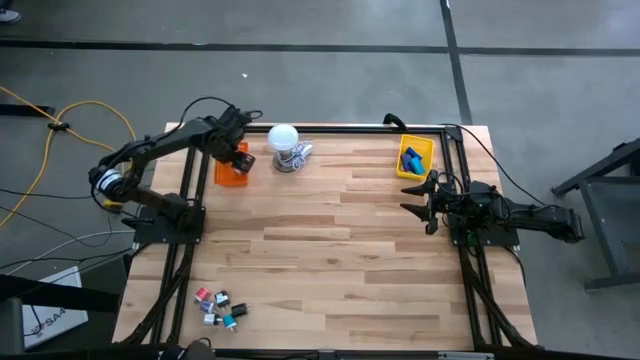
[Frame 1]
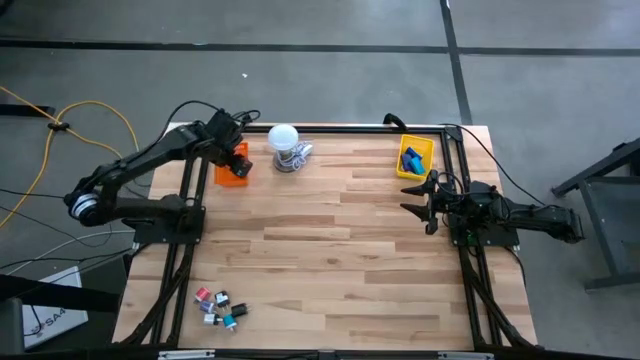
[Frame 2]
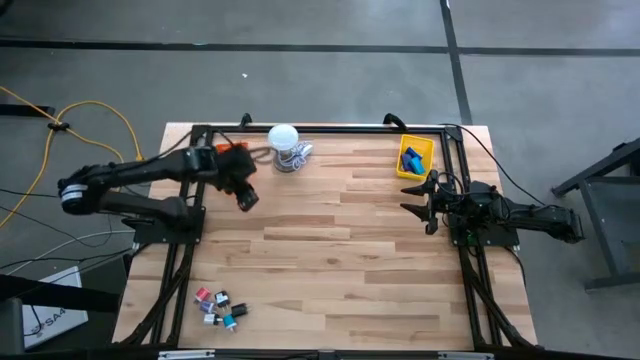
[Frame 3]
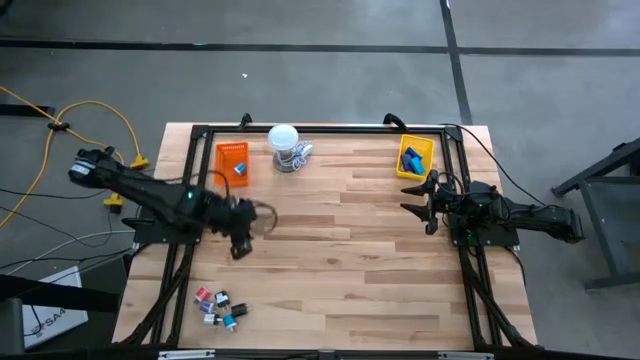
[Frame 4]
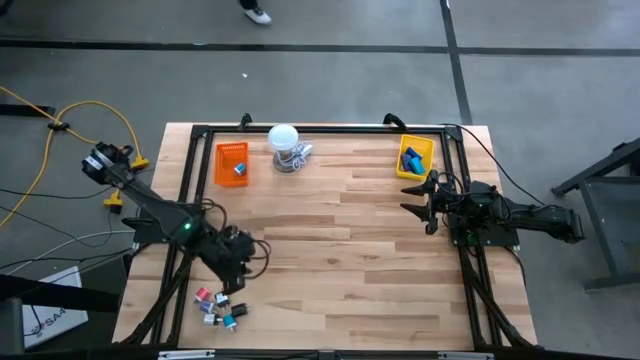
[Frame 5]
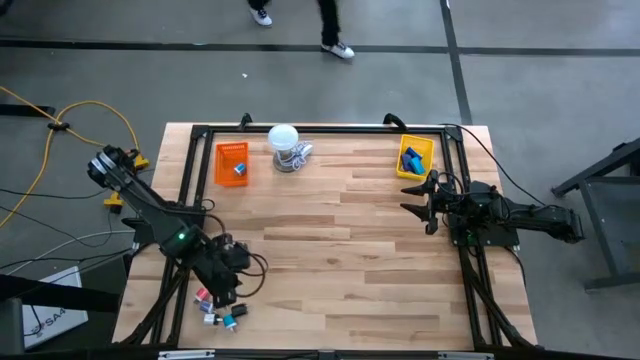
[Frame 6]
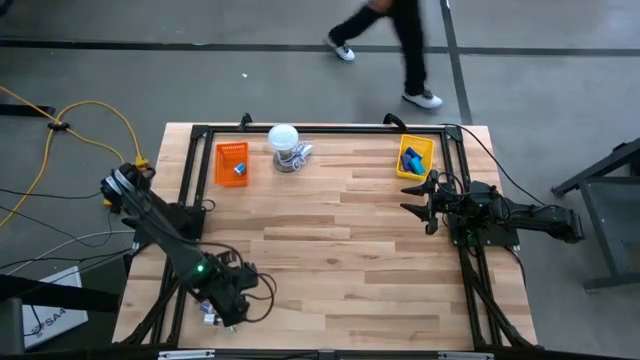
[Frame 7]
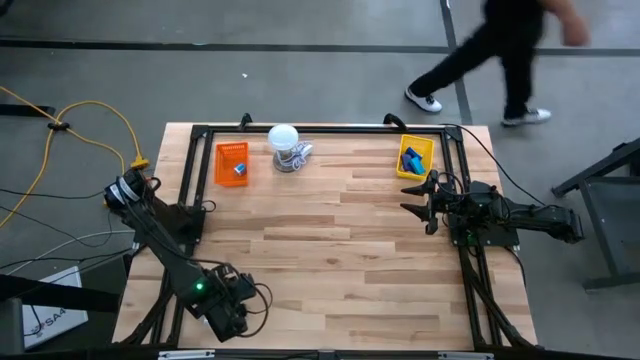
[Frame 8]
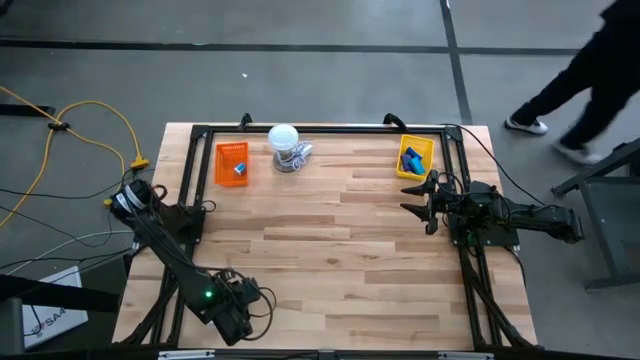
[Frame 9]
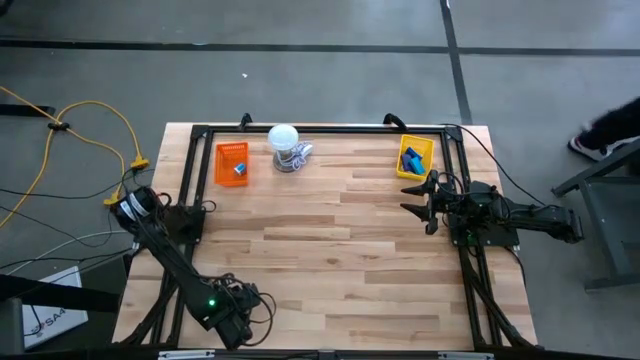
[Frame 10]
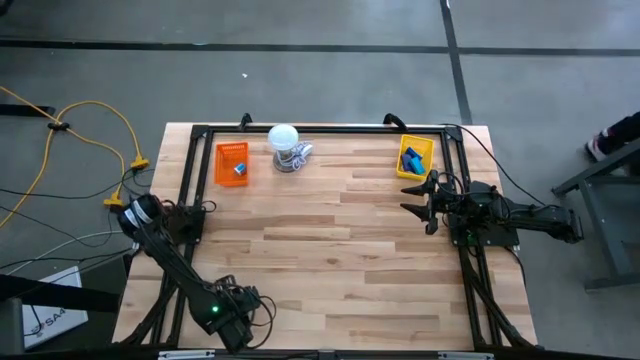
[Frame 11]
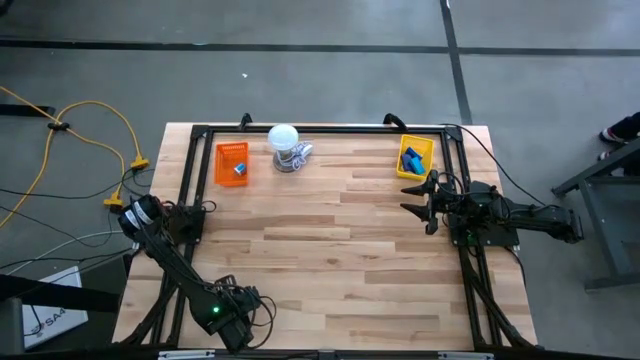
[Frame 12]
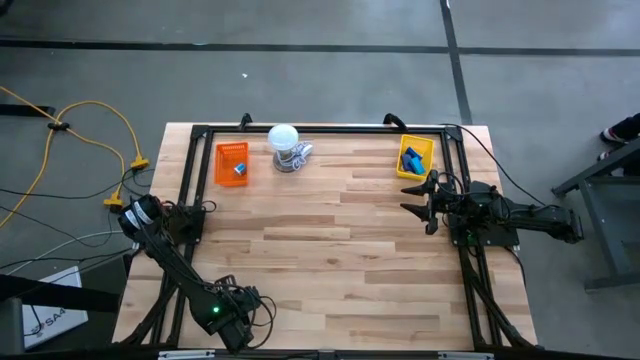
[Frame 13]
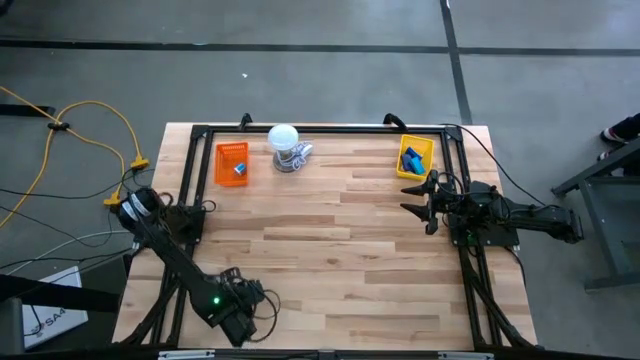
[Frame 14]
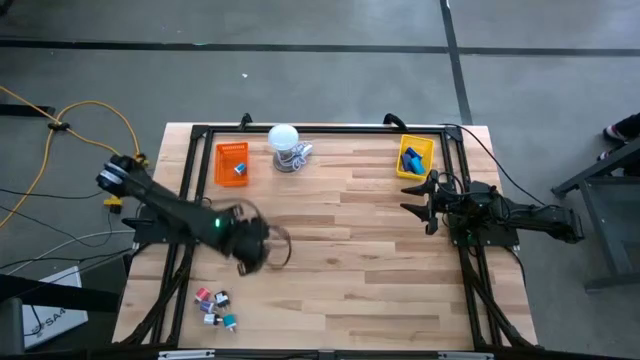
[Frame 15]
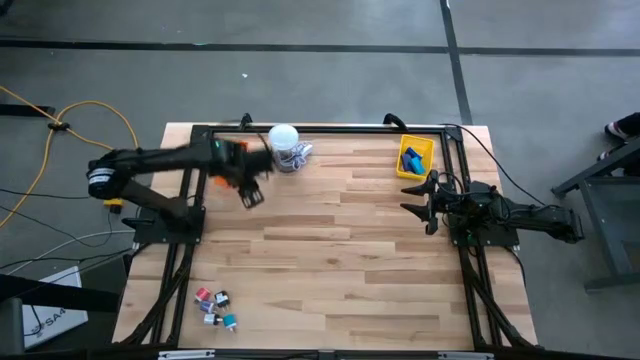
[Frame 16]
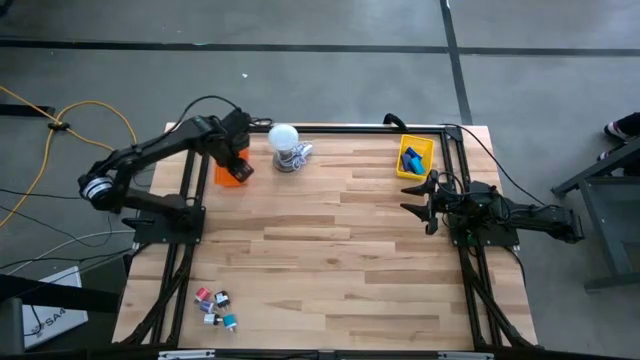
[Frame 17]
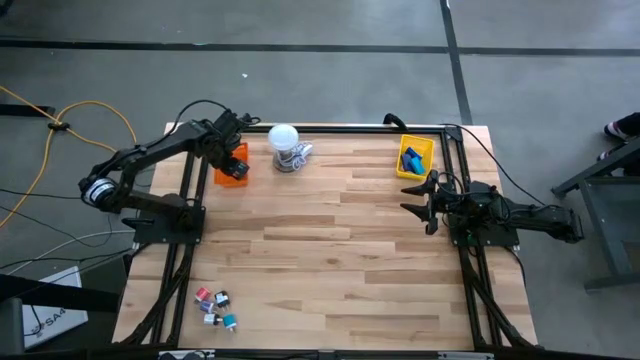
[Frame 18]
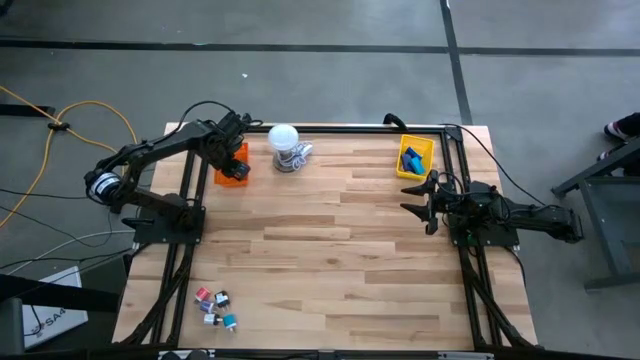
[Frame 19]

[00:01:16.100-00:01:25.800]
Task: Pick & Place Office items
Put the black charger adapter into the orange basket

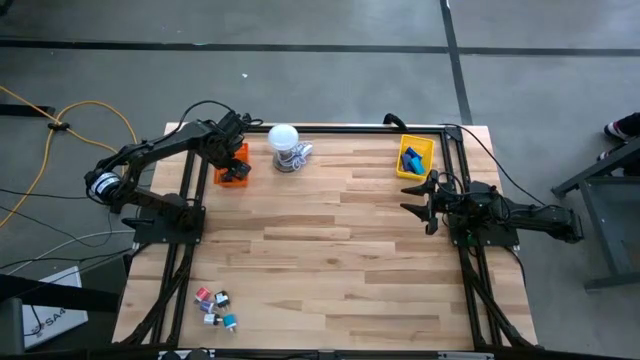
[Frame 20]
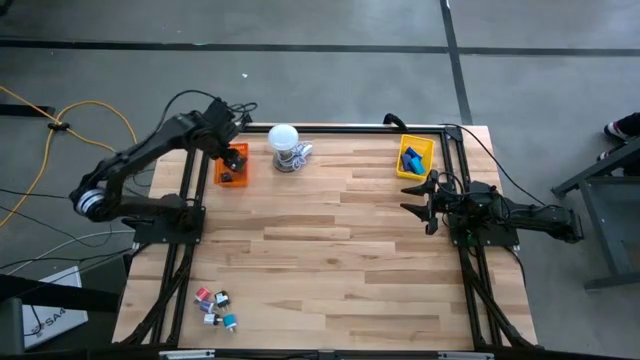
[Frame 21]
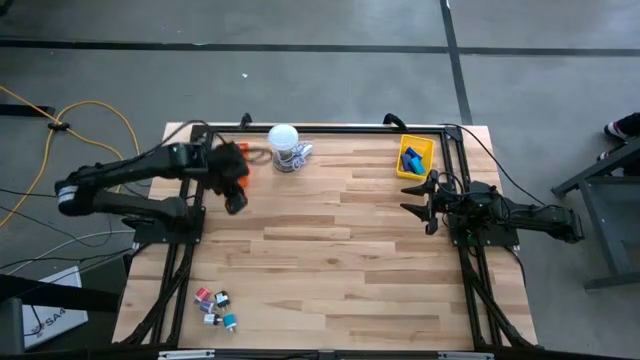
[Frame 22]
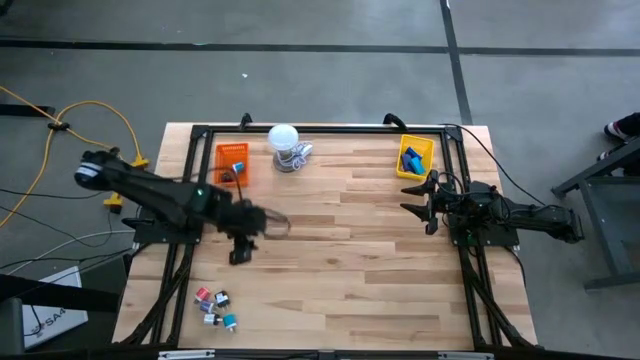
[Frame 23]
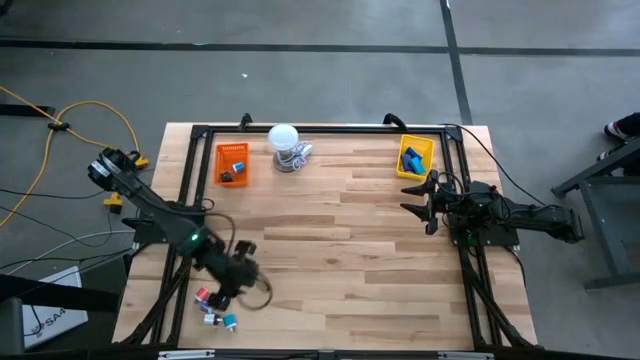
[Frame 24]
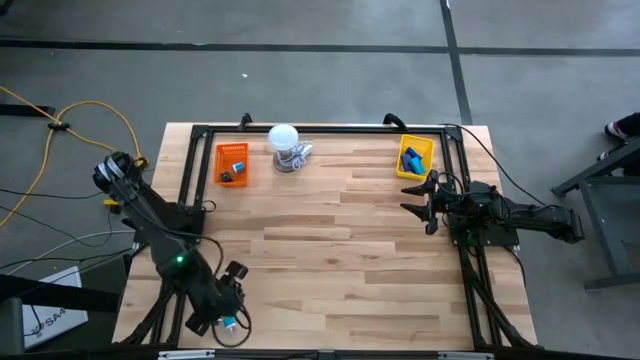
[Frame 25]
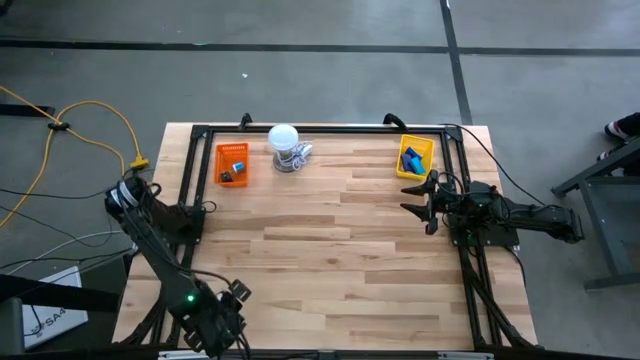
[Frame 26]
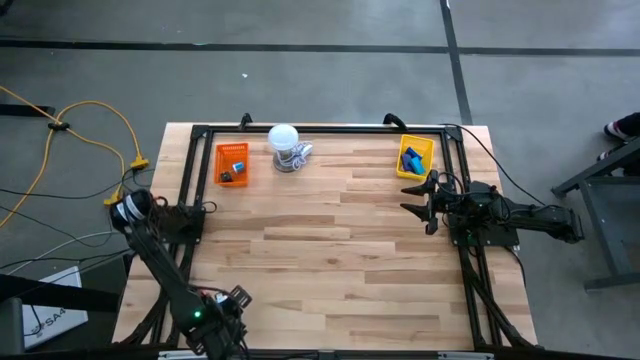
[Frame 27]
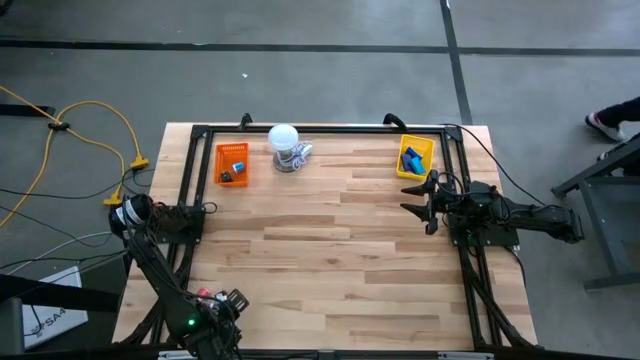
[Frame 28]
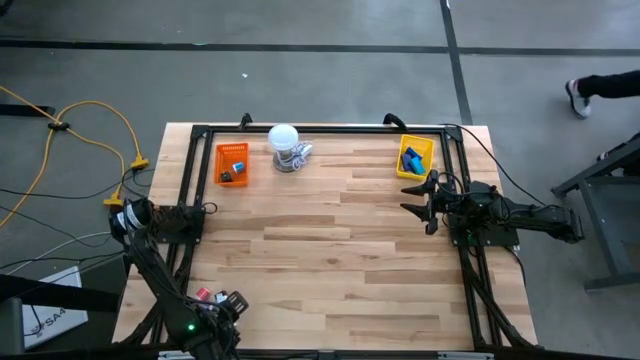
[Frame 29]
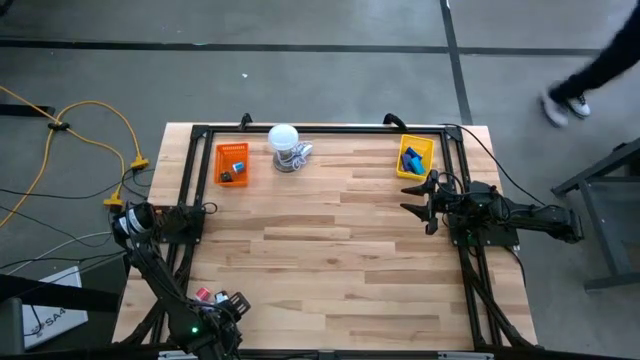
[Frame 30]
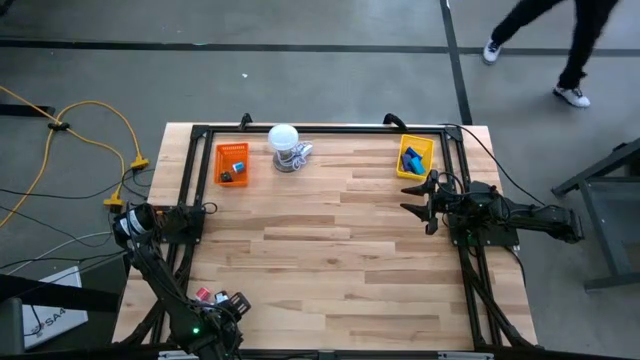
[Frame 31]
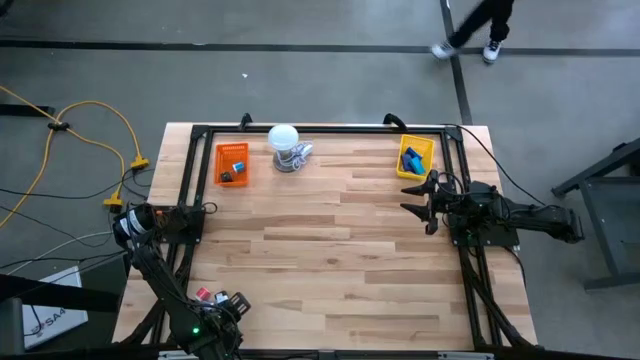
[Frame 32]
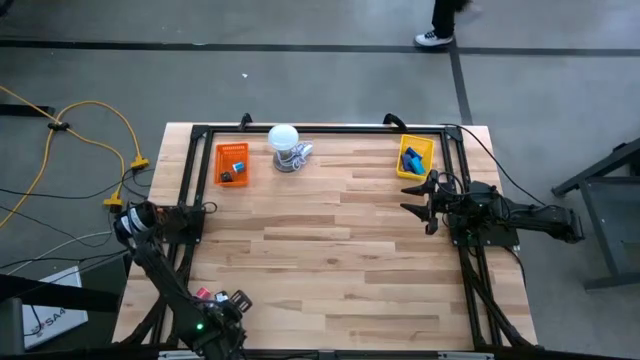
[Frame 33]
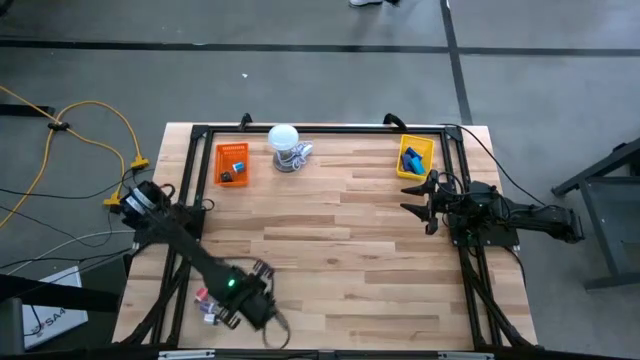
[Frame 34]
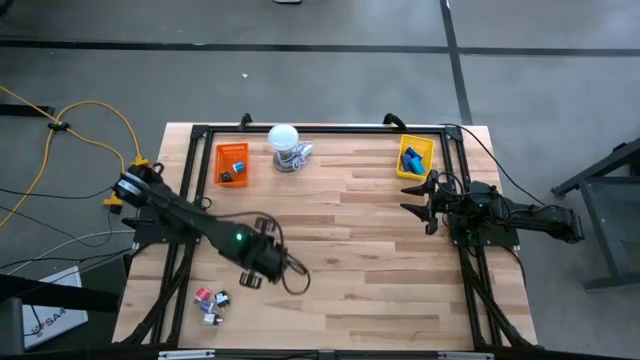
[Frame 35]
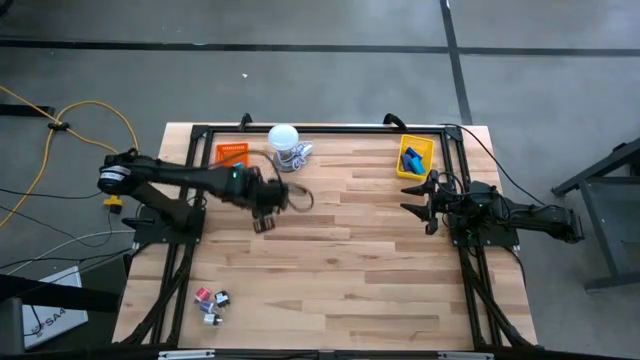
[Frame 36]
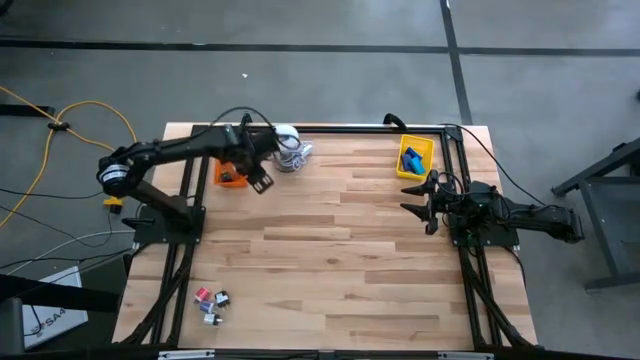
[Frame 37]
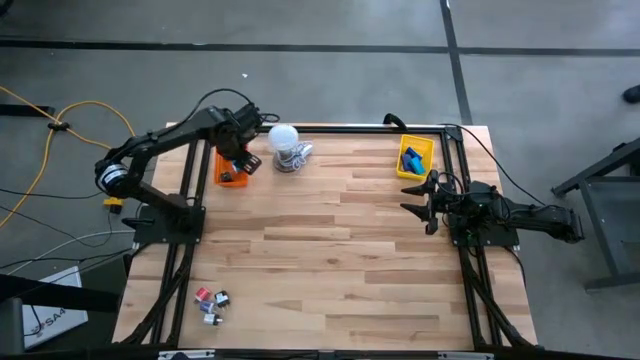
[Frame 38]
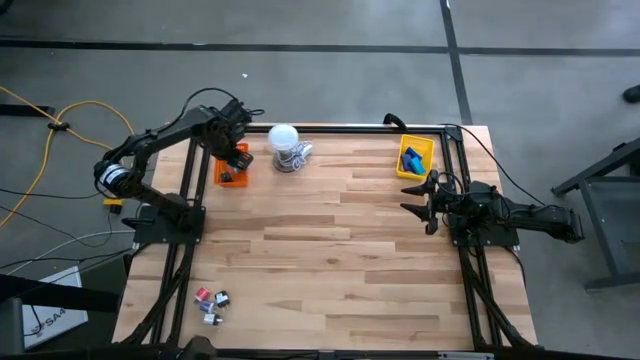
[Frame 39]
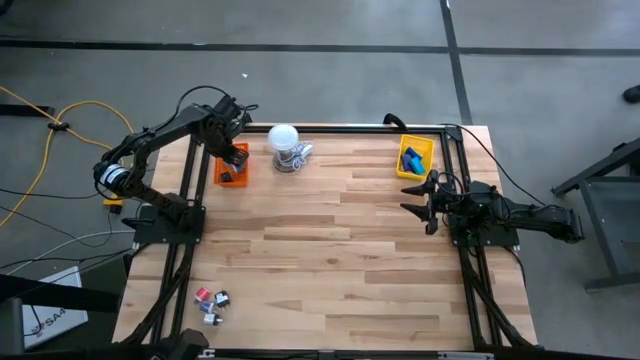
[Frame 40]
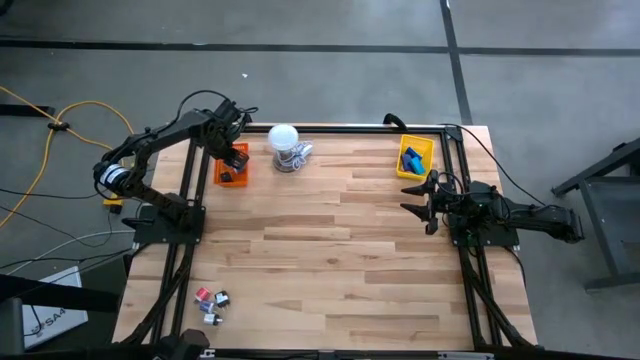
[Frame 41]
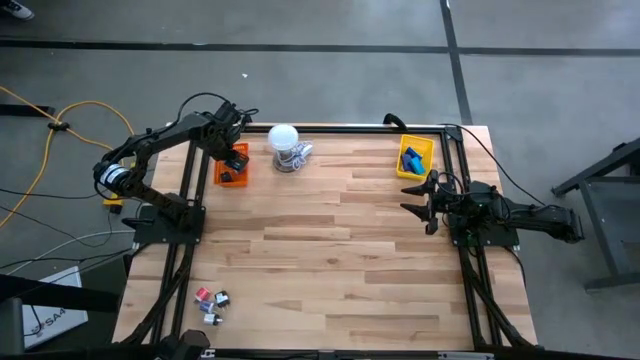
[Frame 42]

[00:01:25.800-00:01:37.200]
Put the light blue charger adapter into the orange basket
